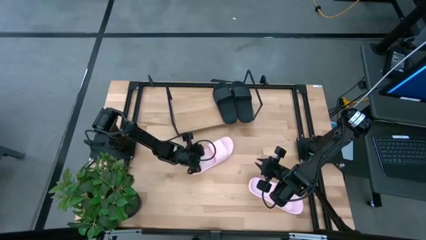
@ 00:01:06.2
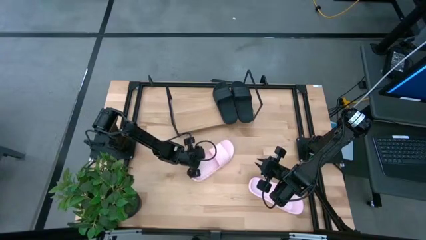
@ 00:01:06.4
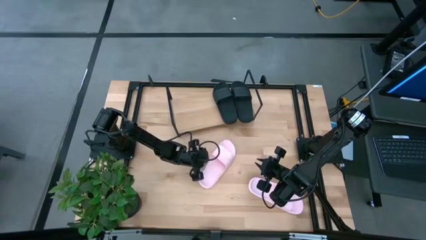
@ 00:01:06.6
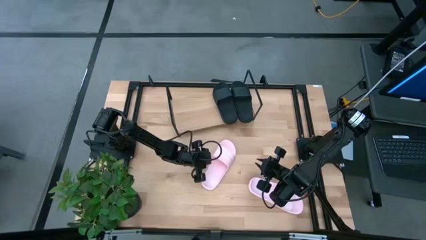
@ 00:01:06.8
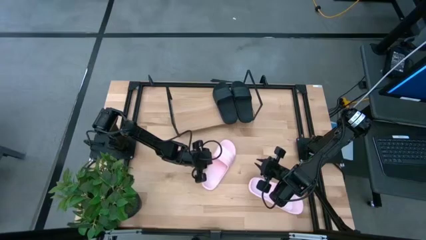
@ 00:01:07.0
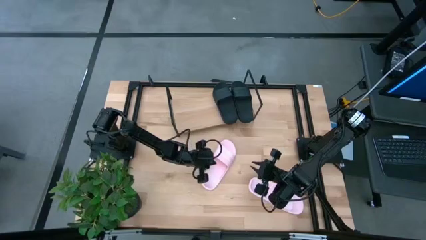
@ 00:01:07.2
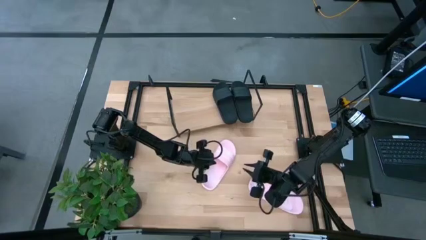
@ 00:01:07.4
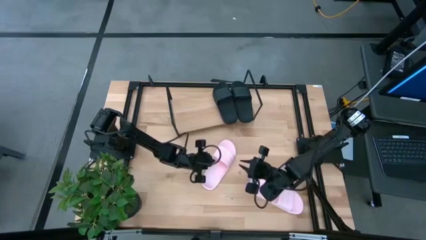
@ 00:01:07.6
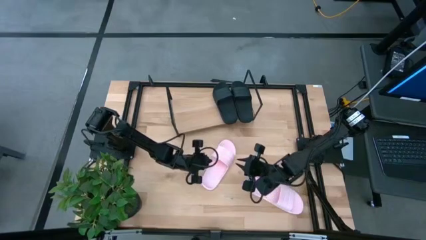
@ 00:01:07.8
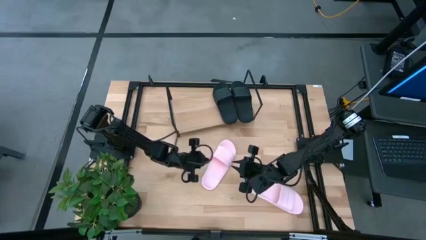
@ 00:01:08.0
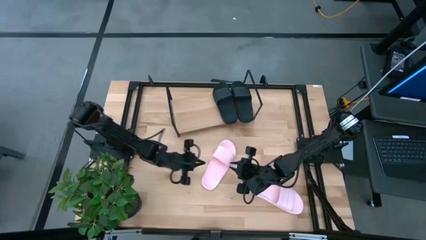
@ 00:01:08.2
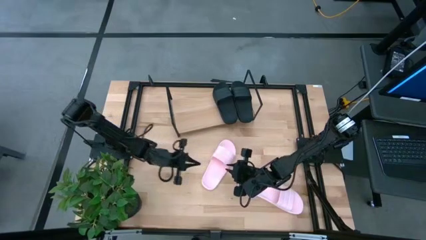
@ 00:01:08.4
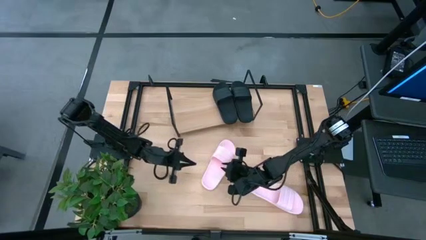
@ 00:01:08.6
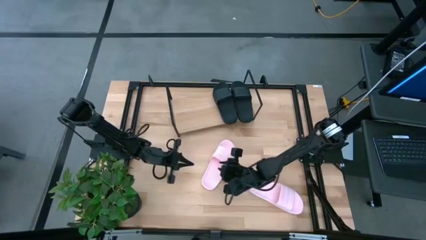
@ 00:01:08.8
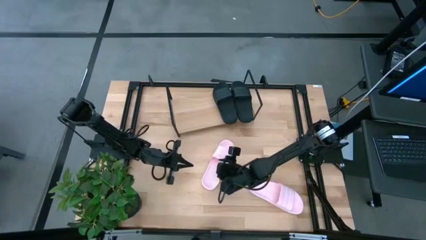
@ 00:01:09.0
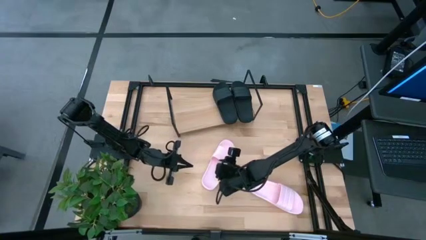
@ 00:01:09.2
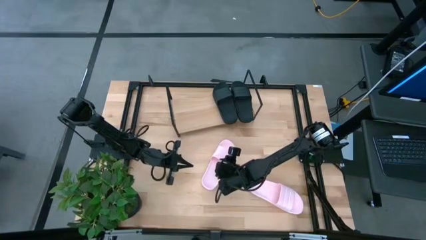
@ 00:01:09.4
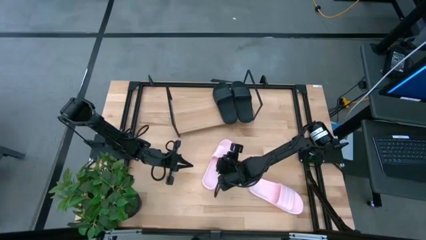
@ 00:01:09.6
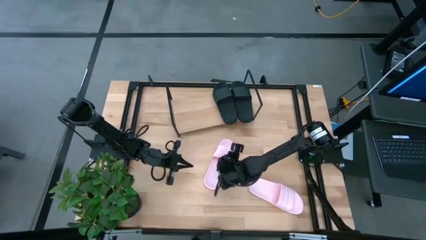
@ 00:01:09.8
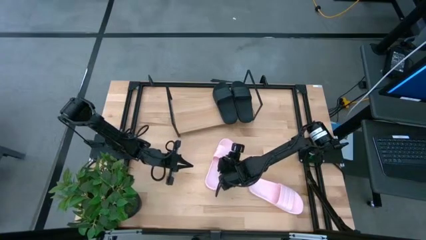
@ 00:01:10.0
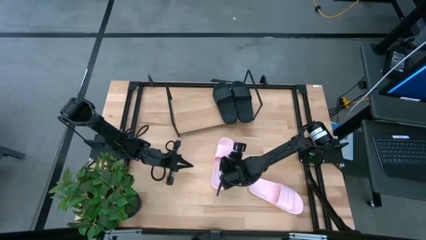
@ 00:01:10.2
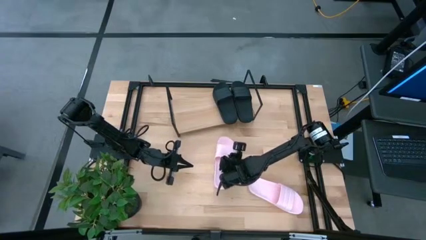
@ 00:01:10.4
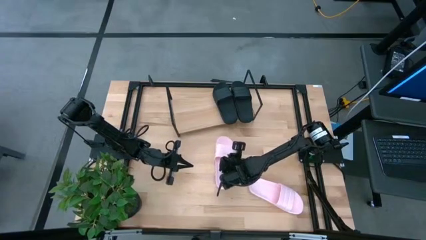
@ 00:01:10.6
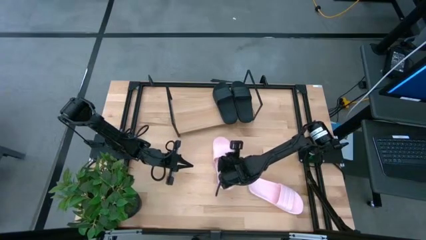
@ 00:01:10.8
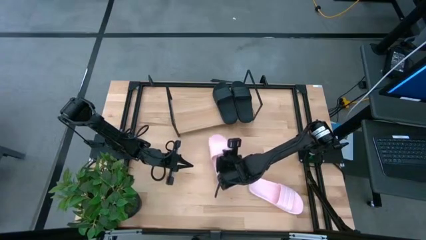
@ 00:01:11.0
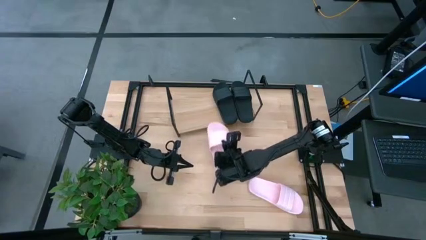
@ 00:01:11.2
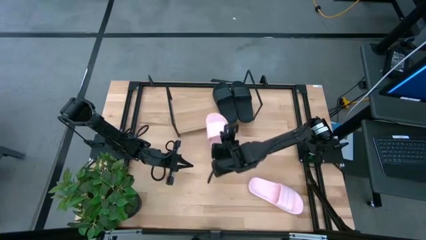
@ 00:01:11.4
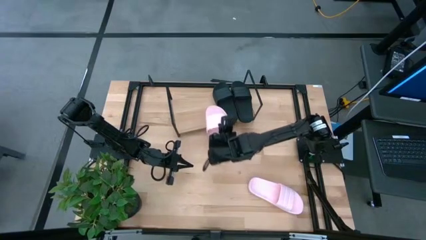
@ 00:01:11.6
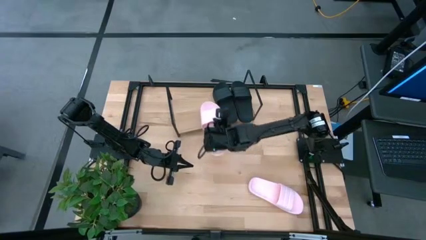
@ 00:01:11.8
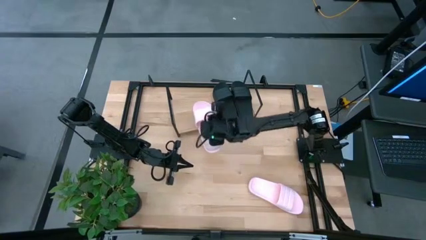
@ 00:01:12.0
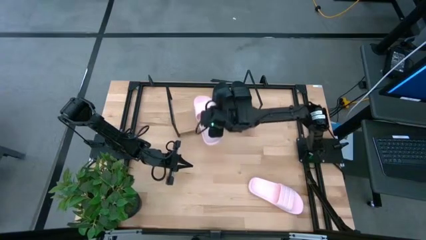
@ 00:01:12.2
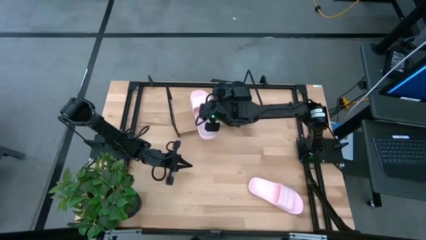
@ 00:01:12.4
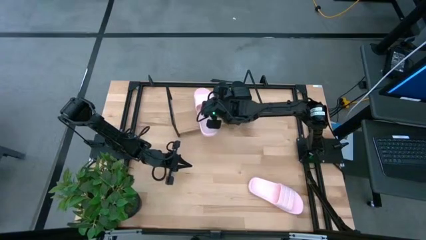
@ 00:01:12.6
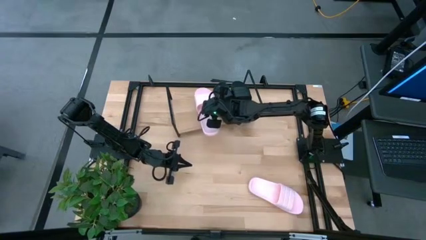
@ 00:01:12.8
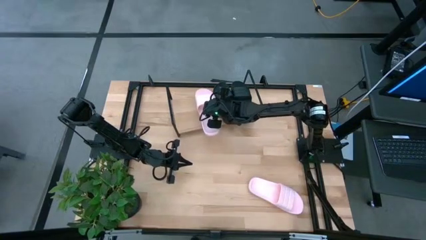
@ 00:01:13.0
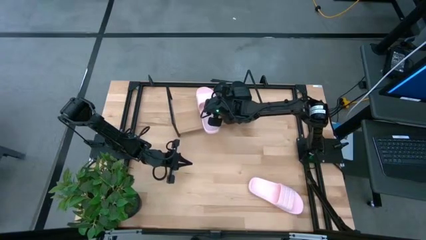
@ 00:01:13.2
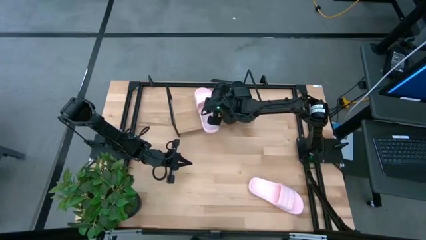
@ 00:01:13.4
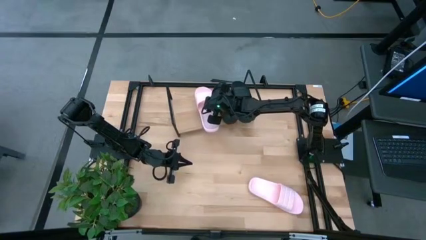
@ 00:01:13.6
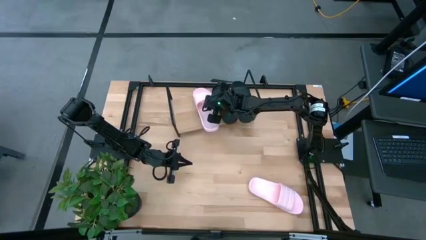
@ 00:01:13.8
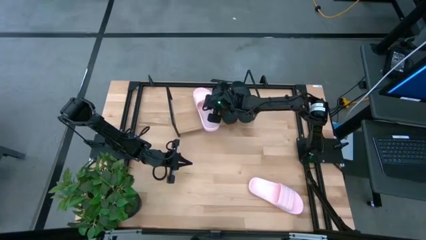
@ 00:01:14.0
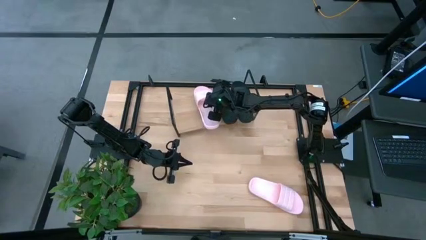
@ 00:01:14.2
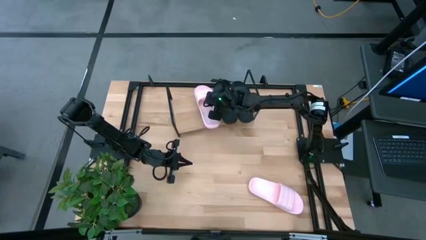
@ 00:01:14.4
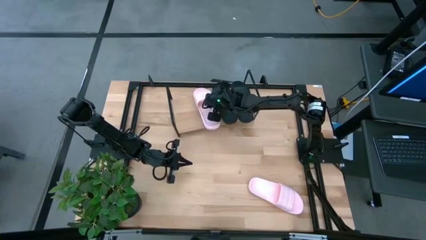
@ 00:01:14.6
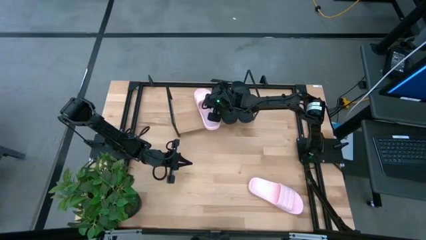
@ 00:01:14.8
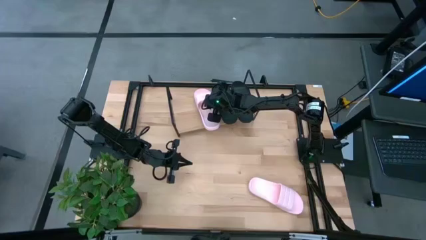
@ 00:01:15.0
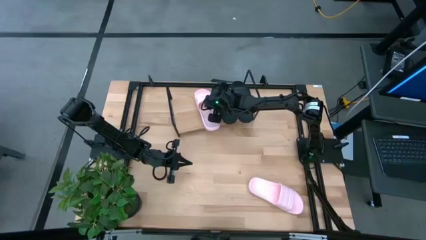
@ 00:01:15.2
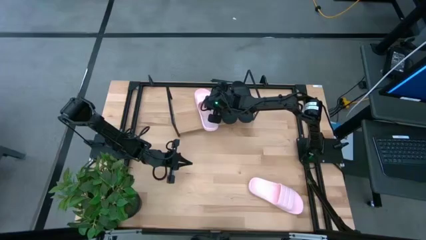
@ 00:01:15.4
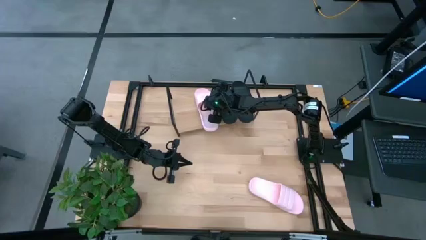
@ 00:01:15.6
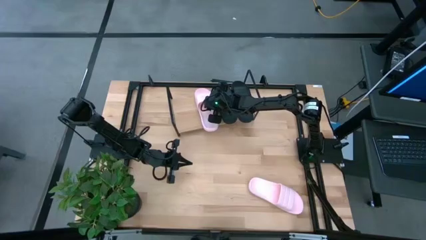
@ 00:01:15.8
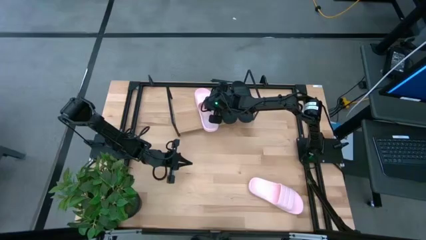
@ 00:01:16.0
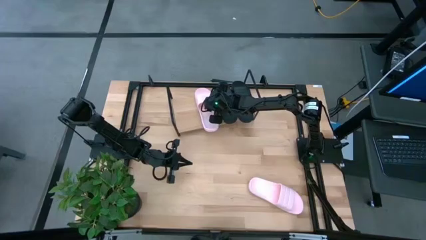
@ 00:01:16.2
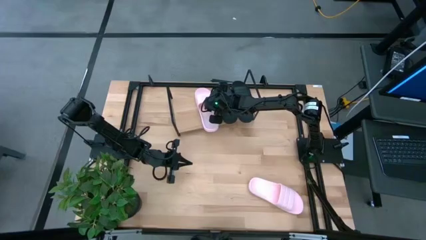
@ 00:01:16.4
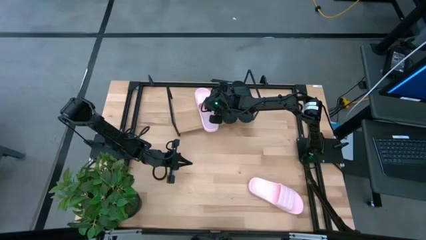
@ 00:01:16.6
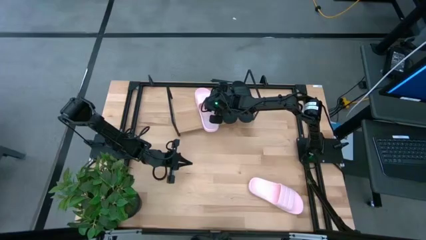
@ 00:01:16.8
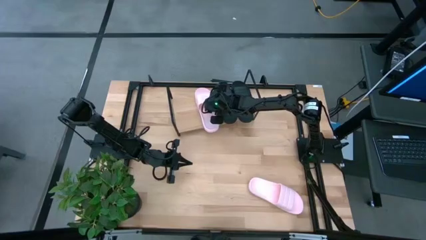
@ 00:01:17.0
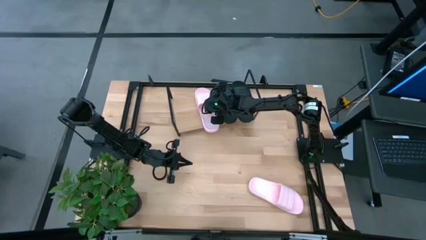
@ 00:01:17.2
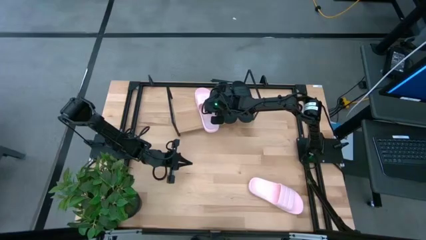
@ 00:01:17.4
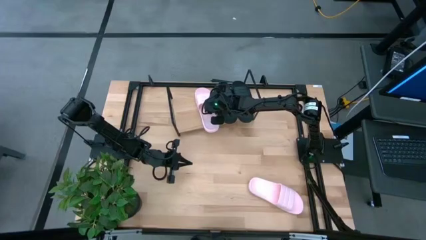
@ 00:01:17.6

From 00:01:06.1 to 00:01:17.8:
Task: Pick and place slides into the shelf
Put the left pink slipper on the shelf
